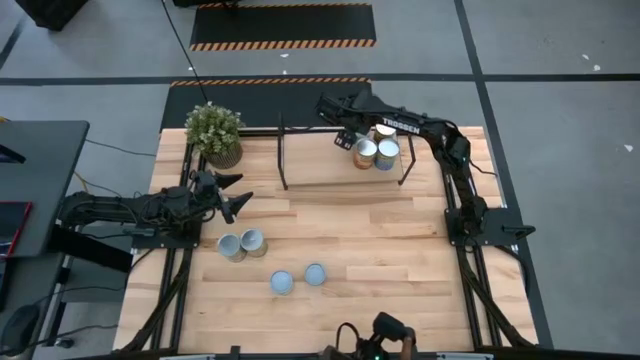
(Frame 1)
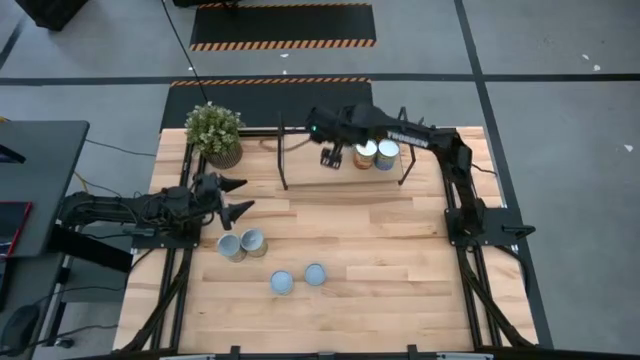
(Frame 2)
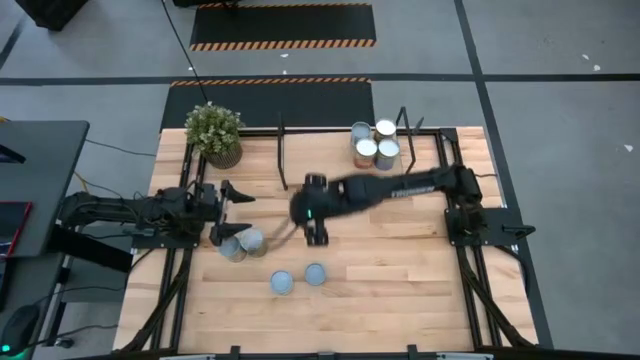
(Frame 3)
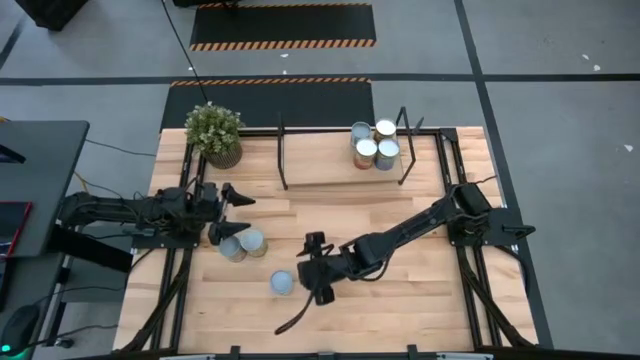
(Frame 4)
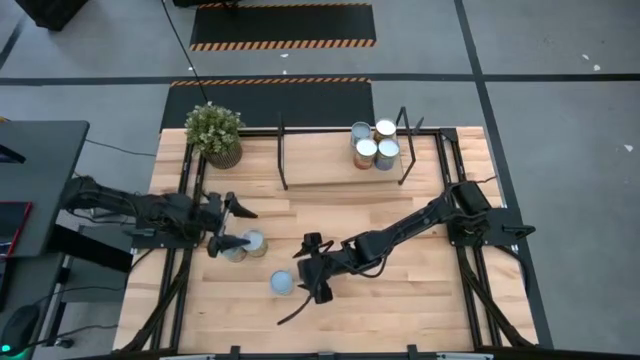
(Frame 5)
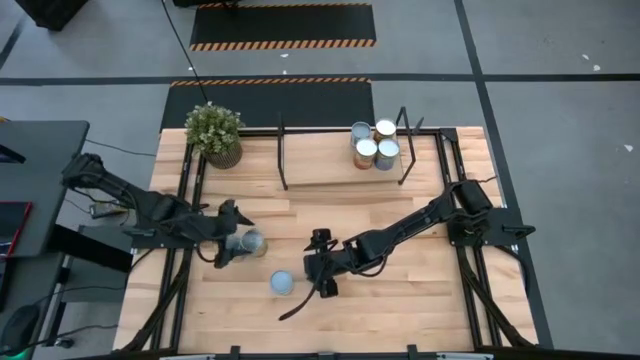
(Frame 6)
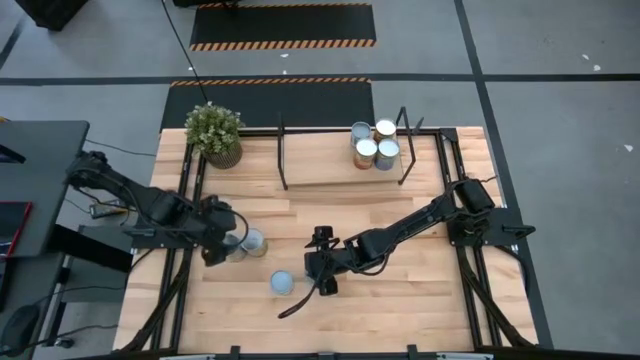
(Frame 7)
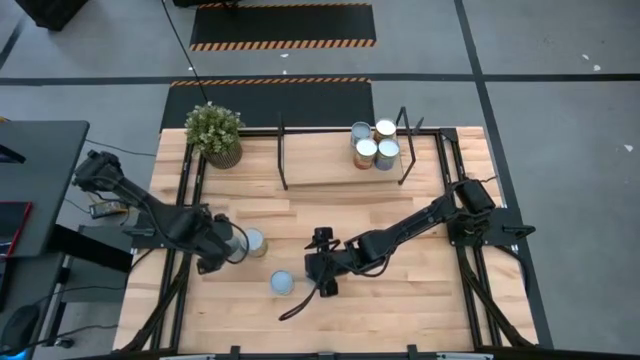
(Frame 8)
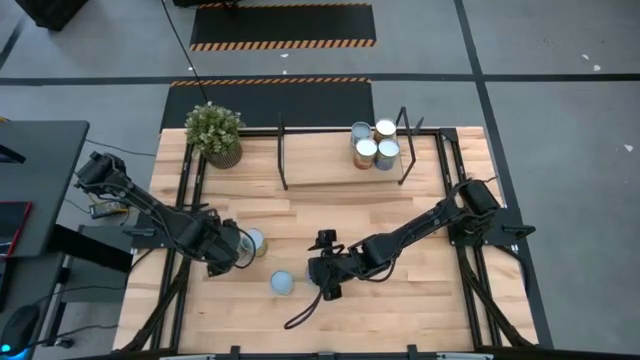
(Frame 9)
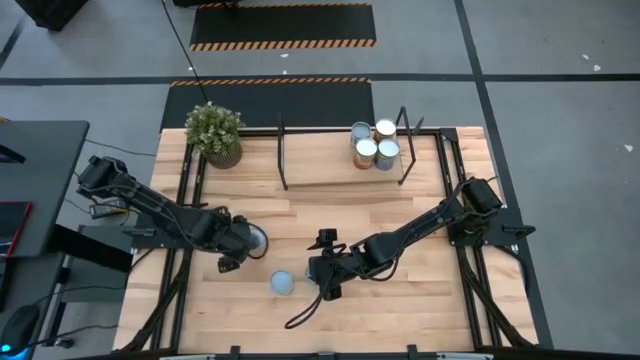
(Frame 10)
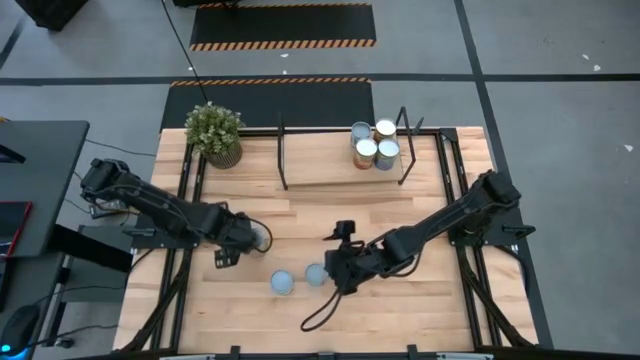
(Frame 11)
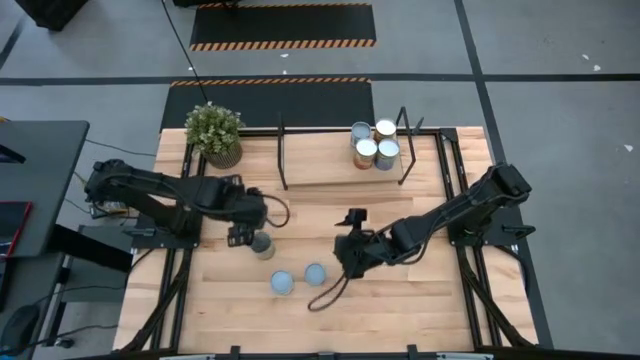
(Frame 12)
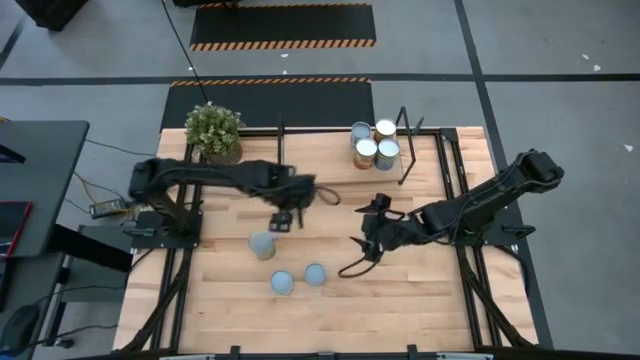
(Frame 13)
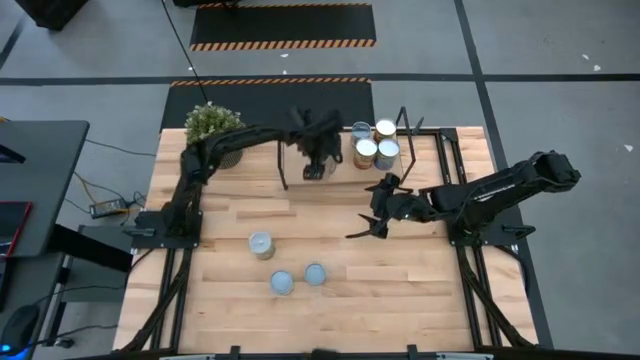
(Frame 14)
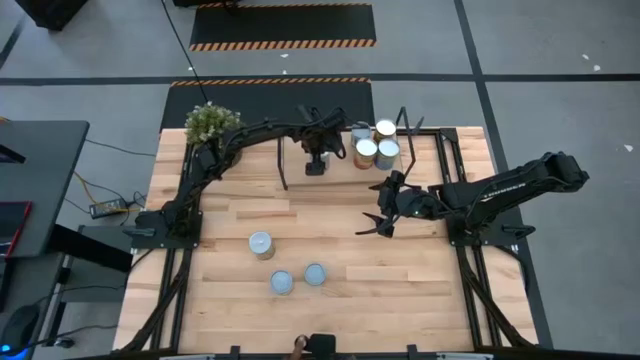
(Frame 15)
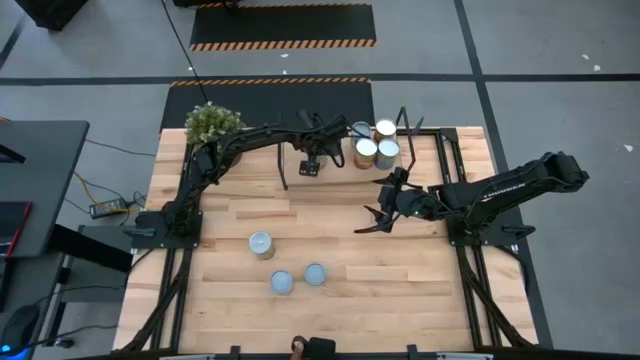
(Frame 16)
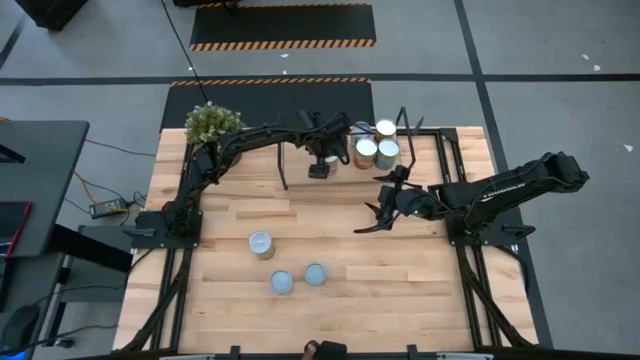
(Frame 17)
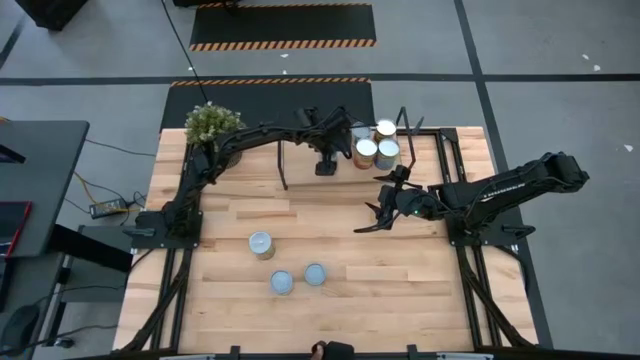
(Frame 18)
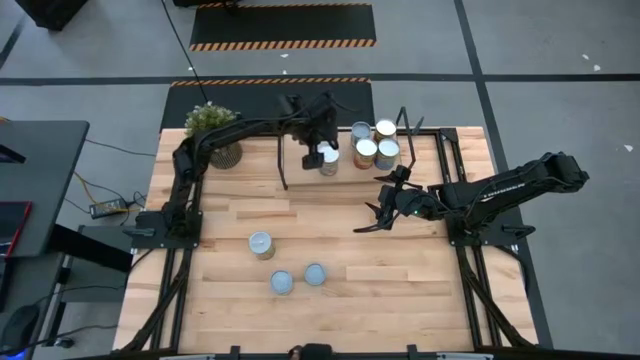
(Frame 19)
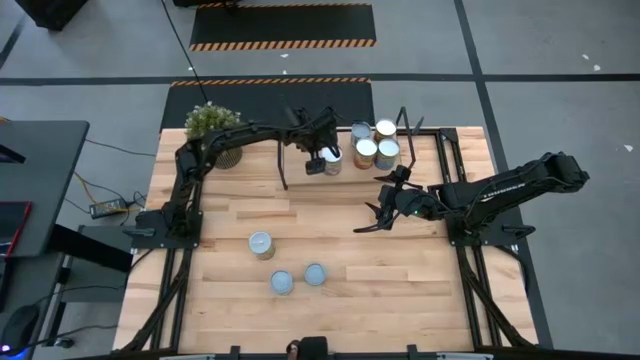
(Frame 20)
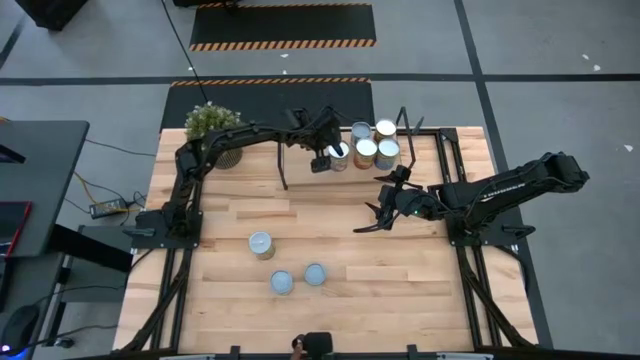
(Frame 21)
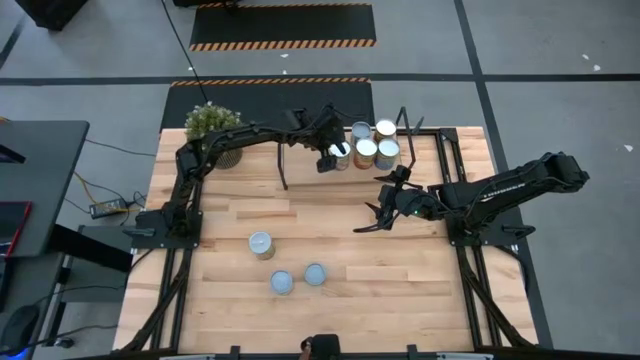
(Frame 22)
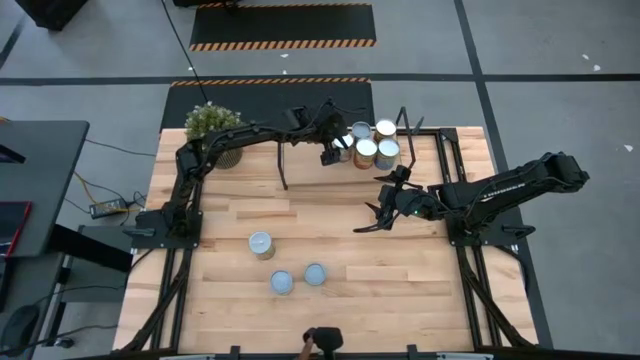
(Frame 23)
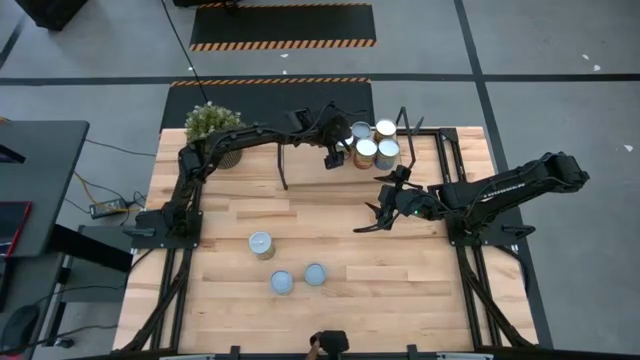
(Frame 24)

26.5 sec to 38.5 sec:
Task: Pick and place cans onto a shelf
Put the canned peaches on the shelf

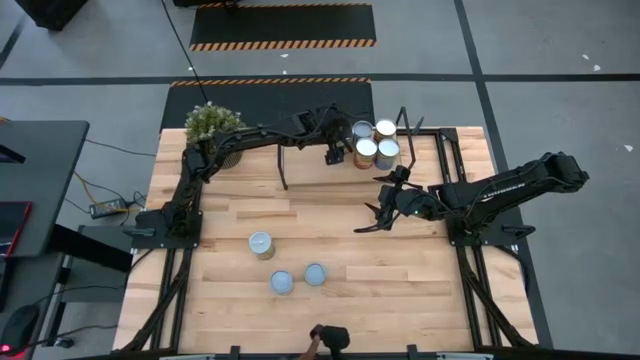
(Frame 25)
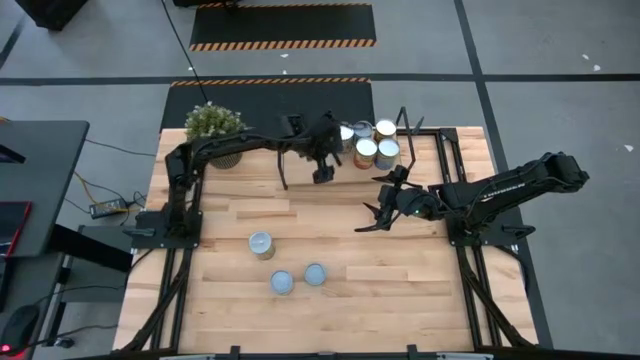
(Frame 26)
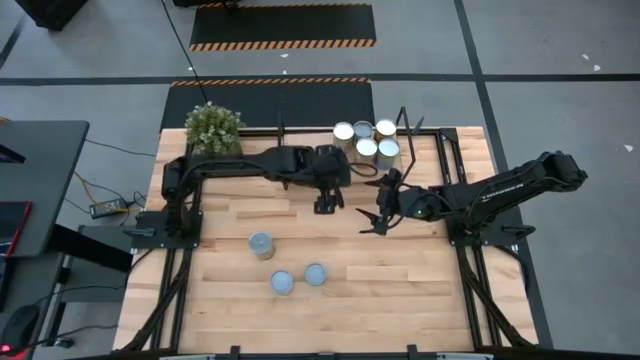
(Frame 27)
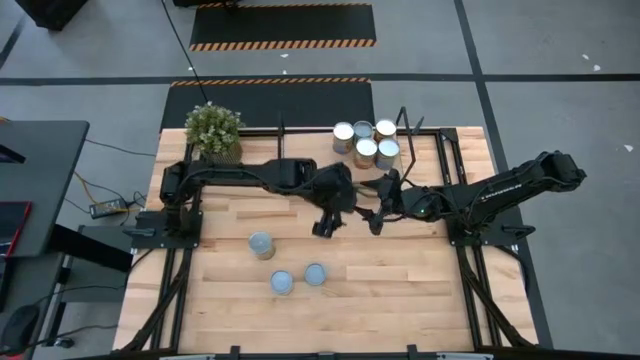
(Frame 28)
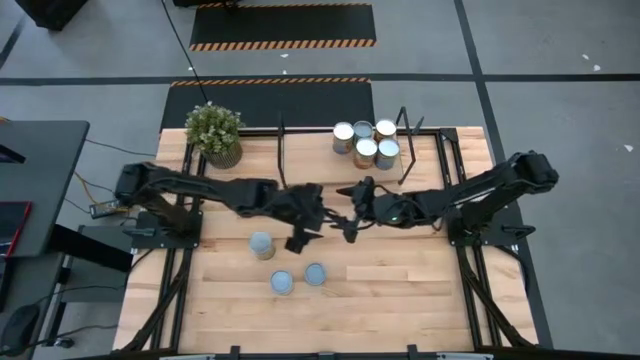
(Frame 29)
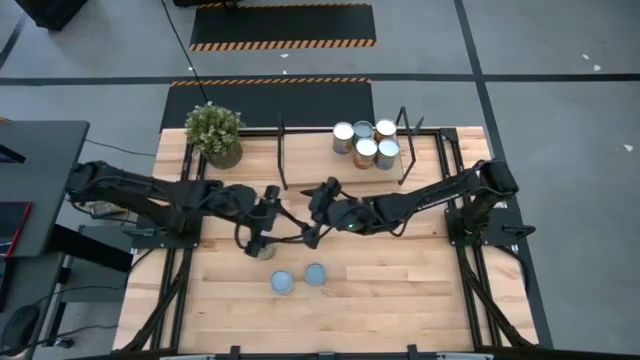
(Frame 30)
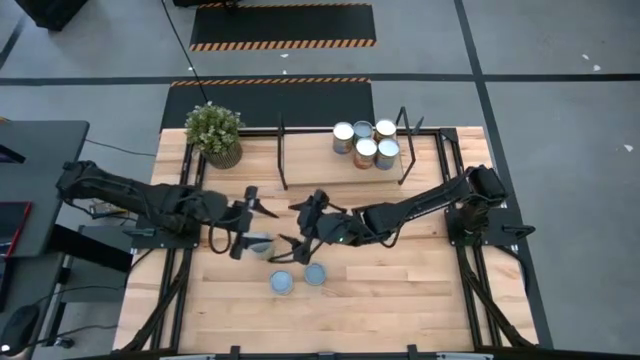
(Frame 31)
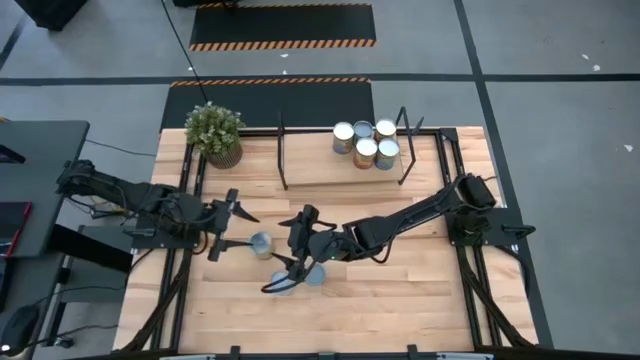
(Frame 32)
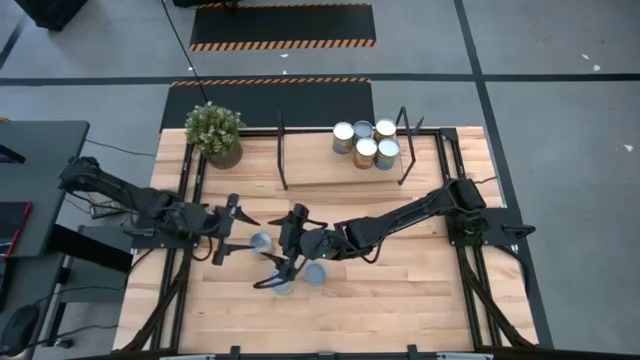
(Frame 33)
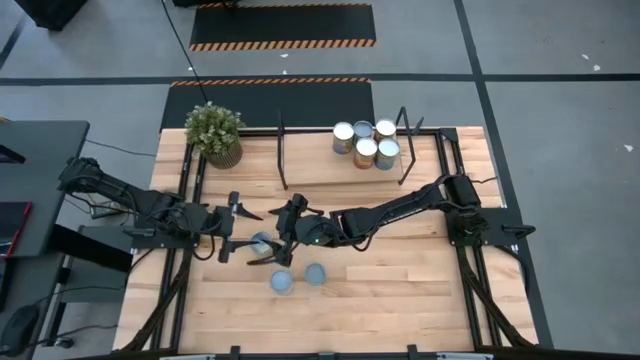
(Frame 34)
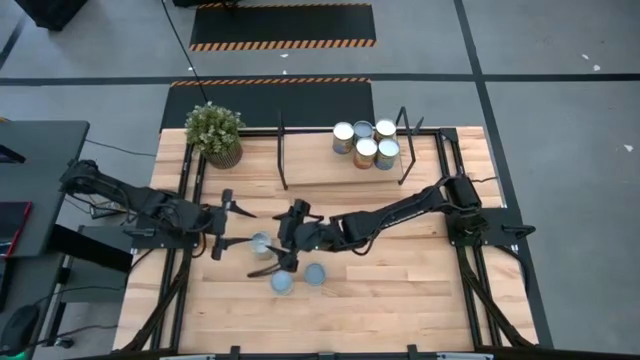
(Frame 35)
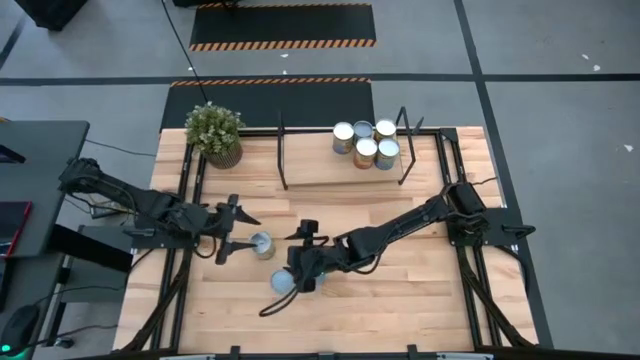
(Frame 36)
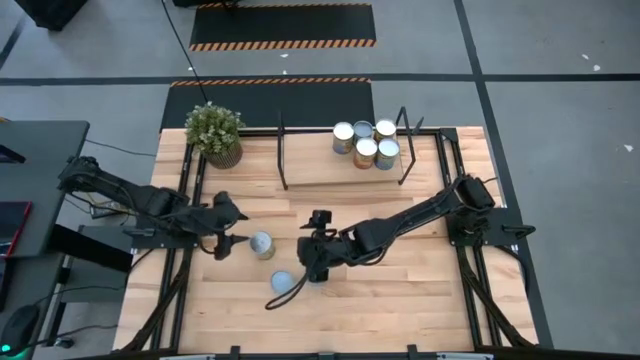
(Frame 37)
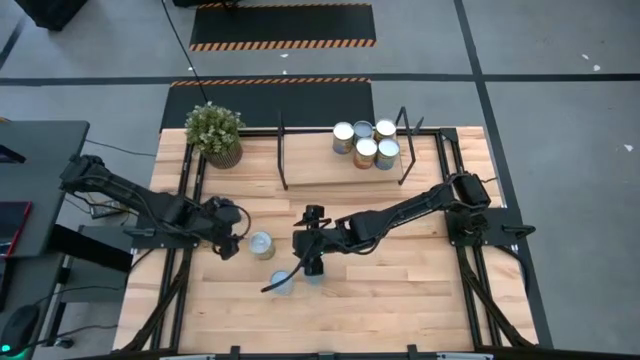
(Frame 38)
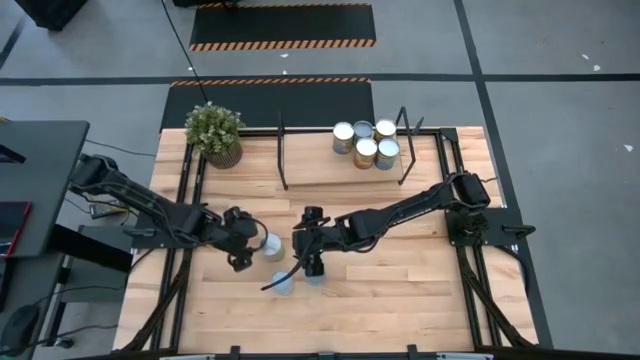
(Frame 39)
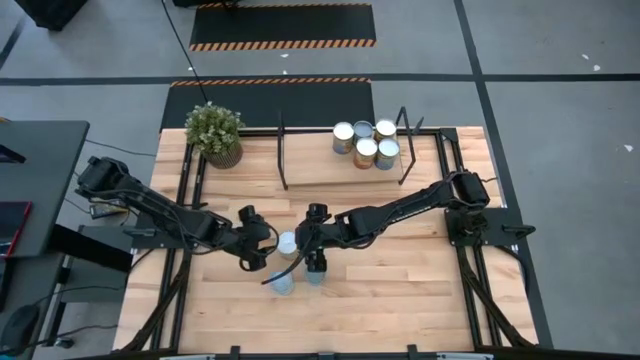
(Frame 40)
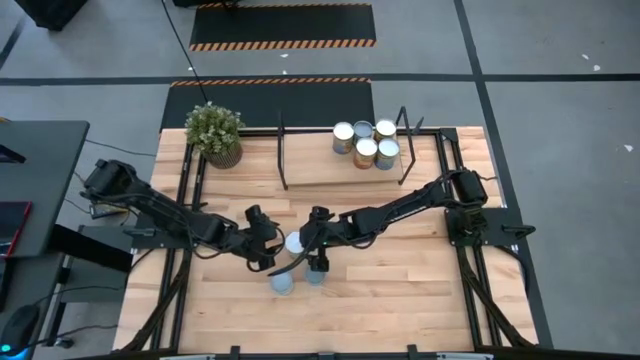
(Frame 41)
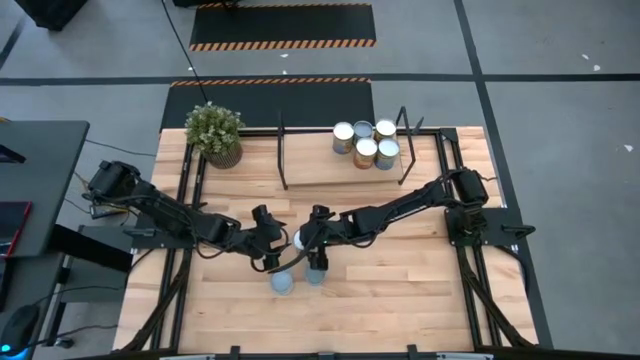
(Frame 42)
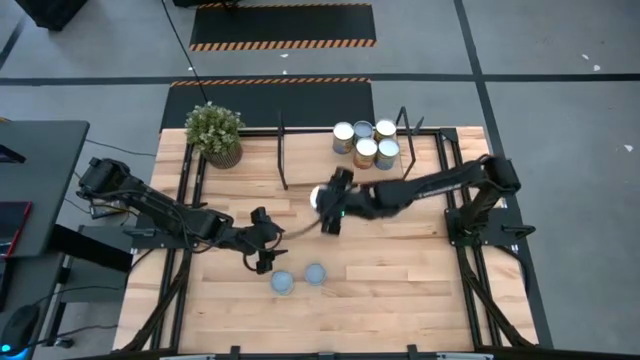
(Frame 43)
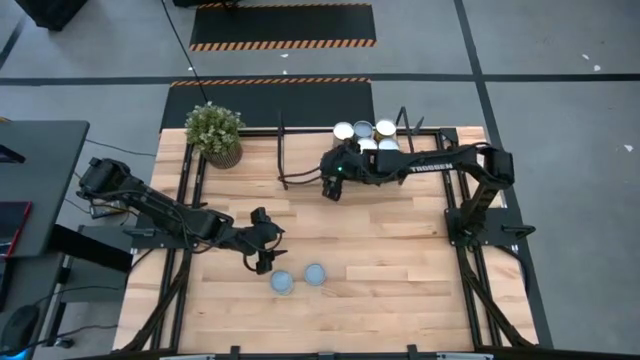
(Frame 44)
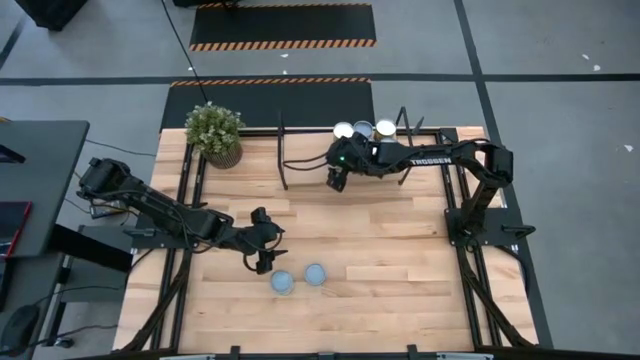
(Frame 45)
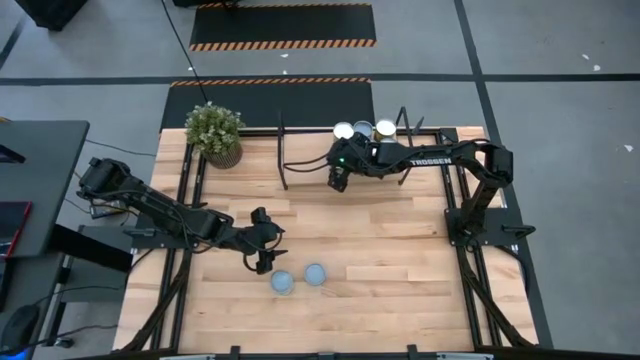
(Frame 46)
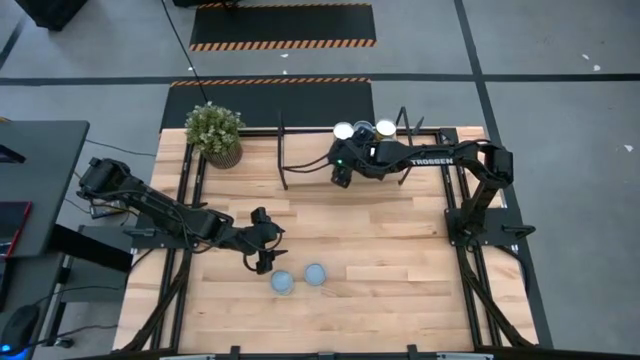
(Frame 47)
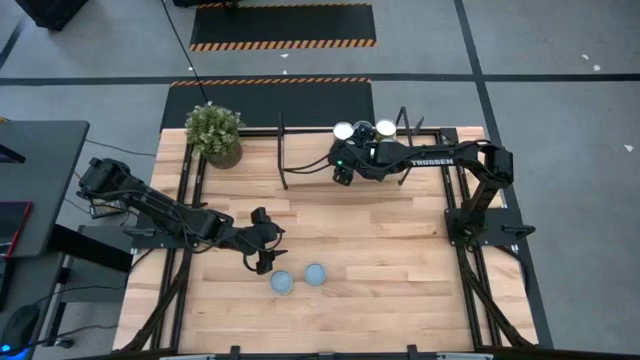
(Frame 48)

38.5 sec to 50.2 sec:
Put the canned oranges on the shelf
